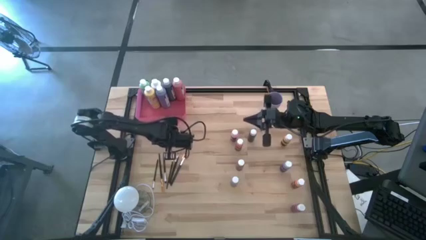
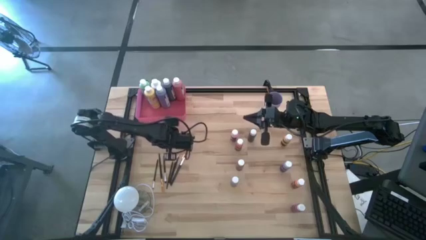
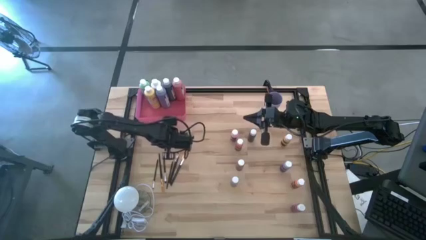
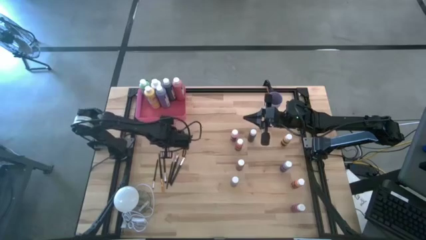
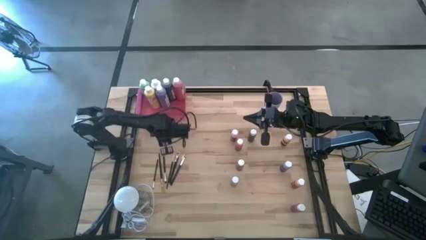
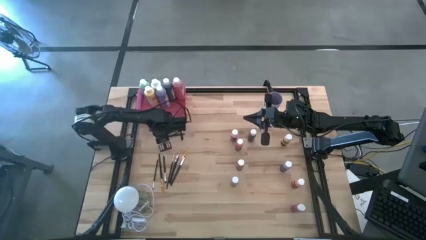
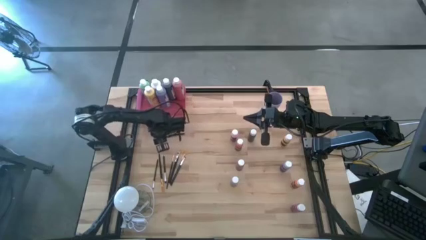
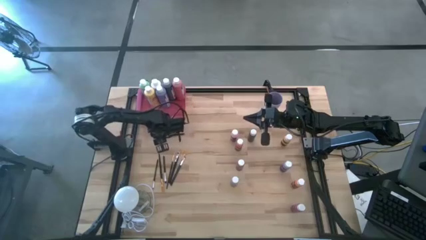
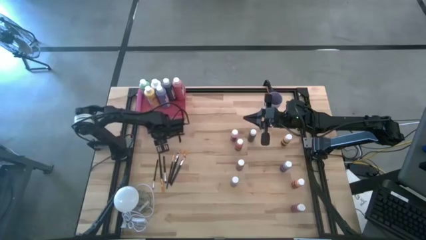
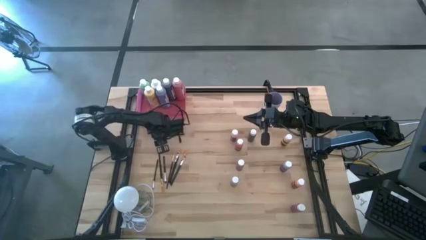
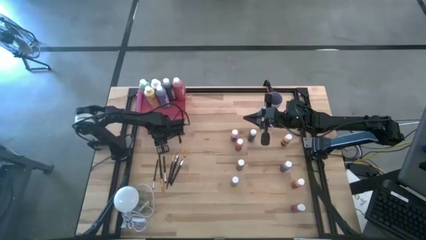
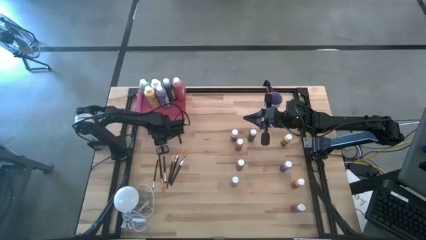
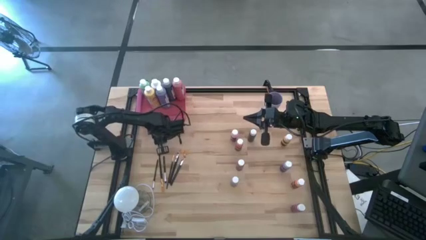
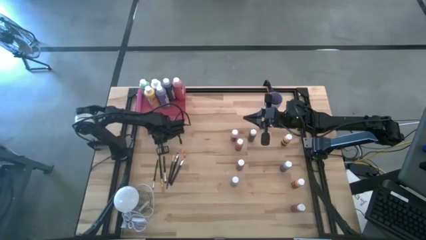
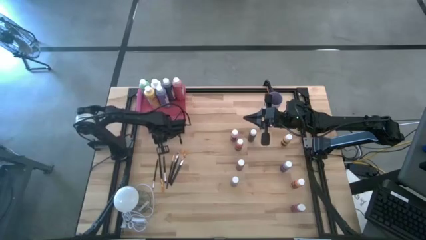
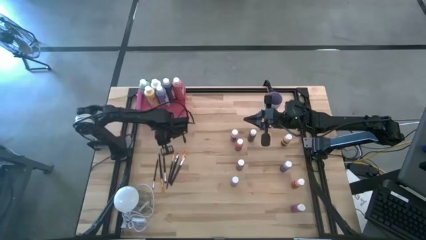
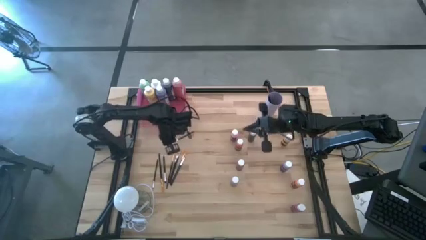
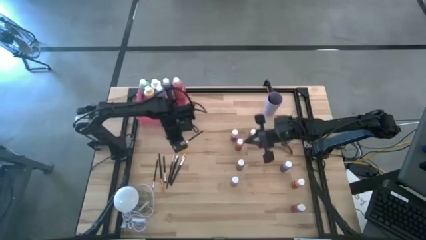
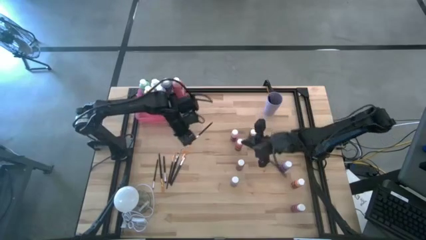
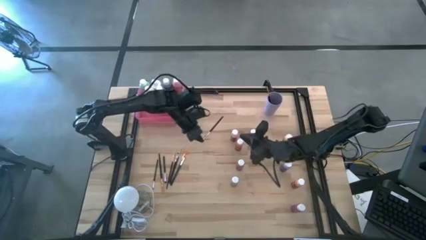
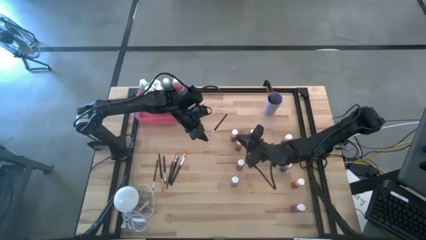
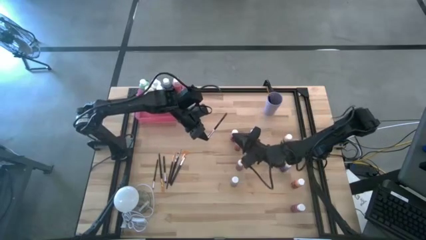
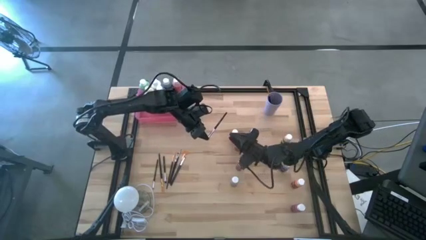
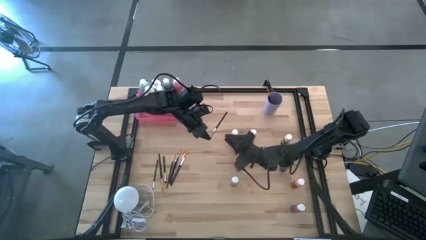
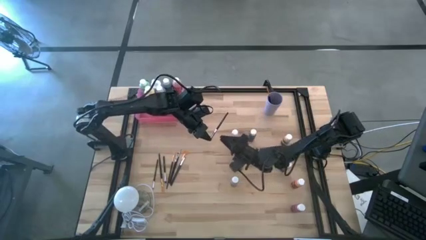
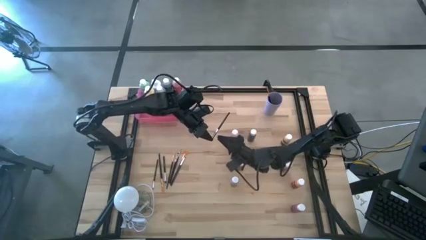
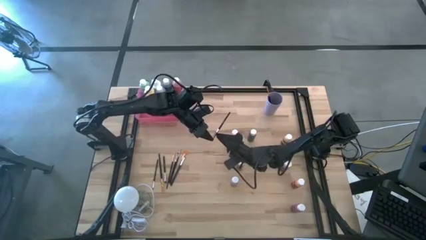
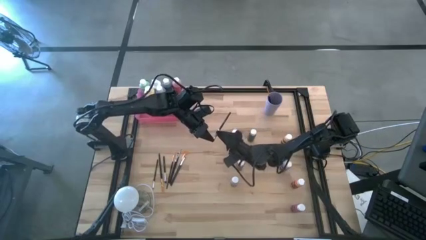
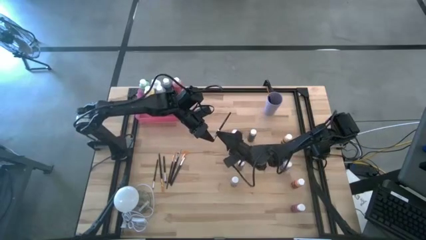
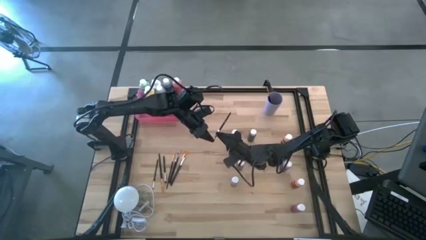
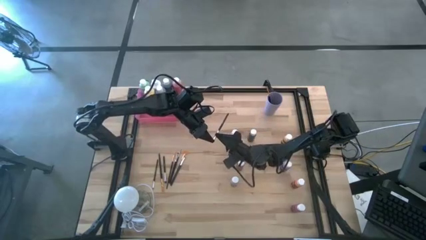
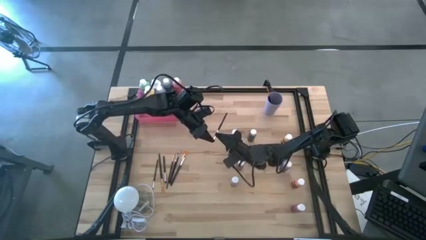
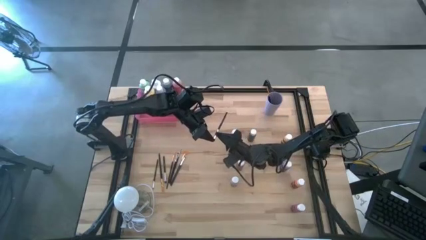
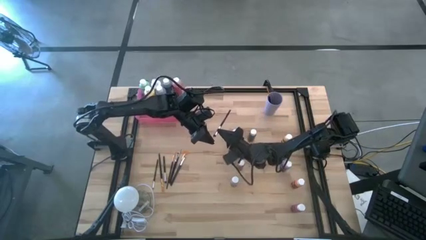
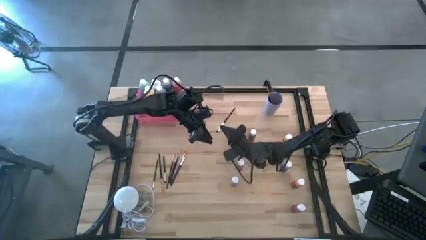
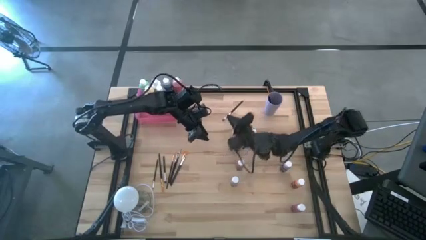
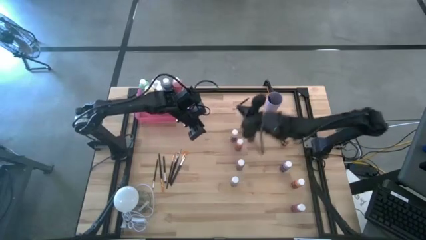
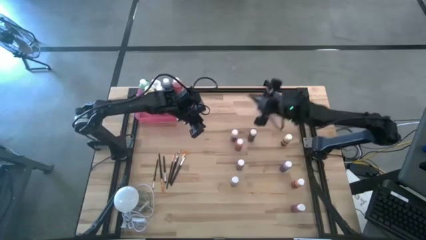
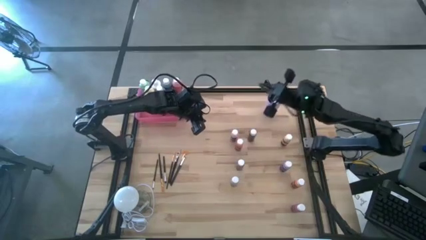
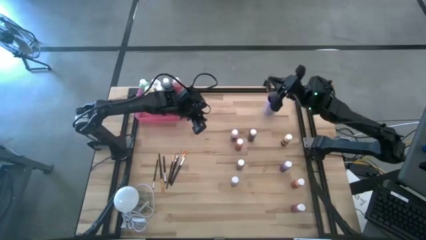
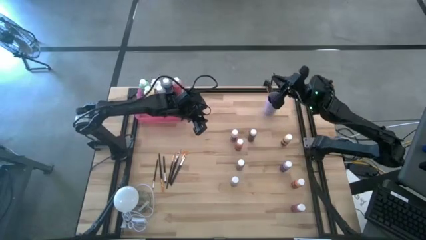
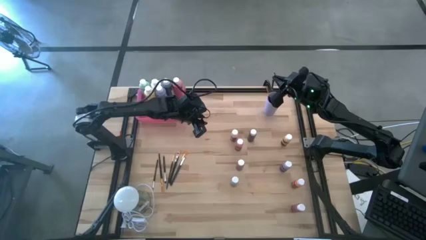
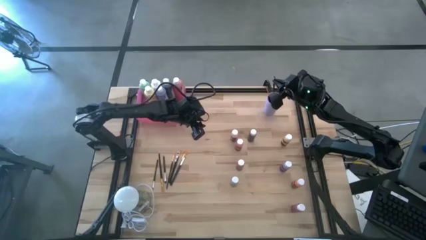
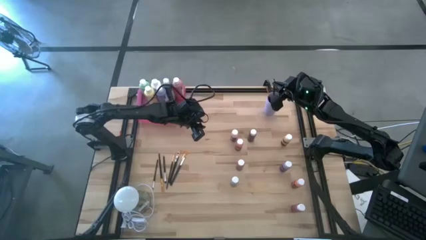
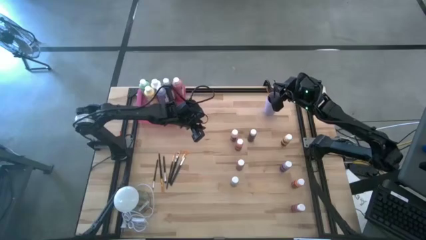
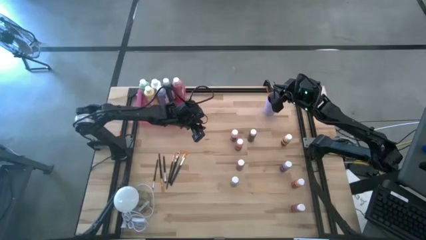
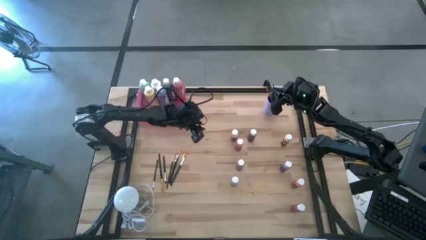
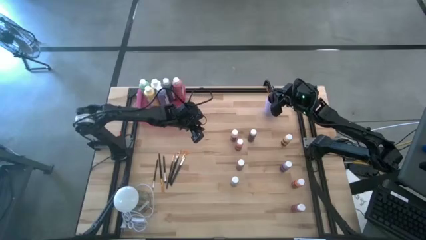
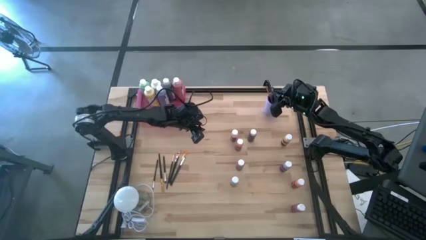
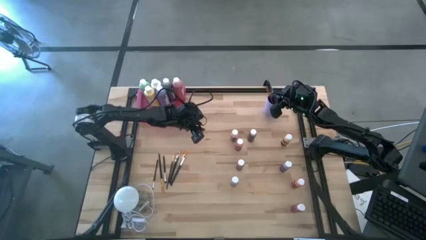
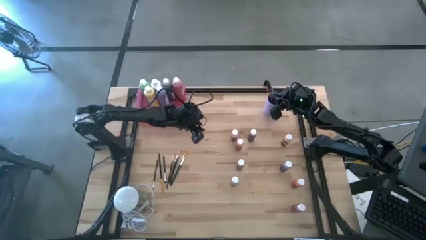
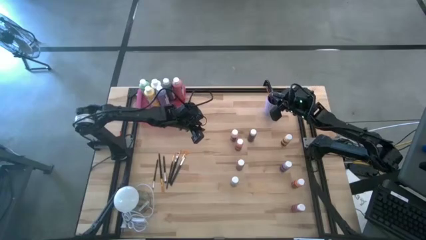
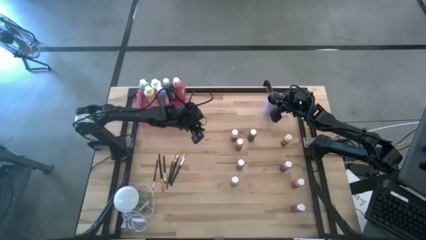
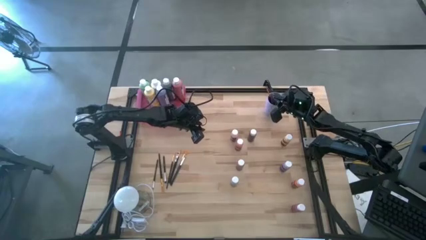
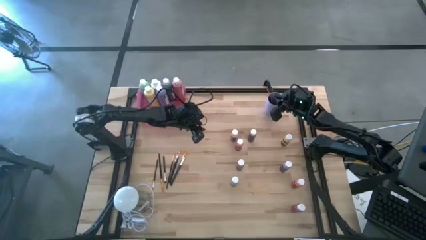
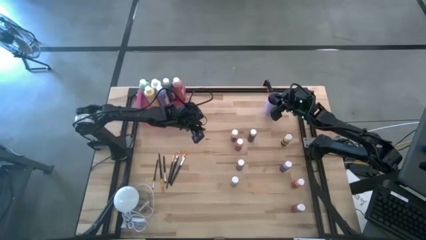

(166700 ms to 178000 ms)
Task: Pick & Place Paint Supplies
Put the silver paint brush into the purple cup

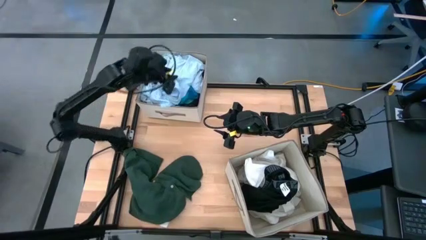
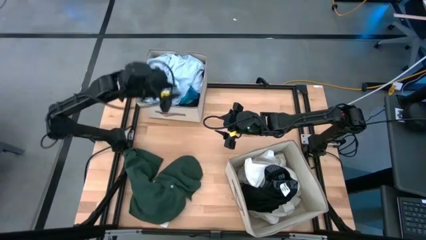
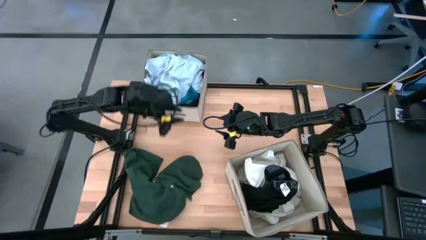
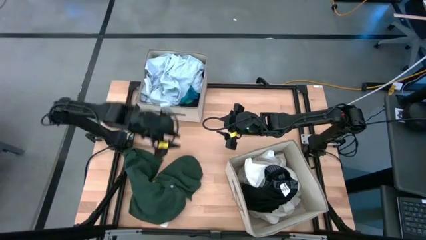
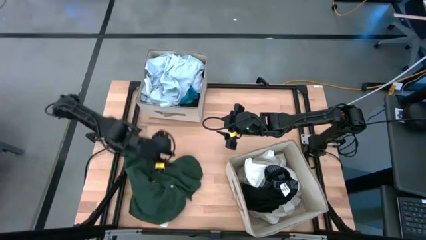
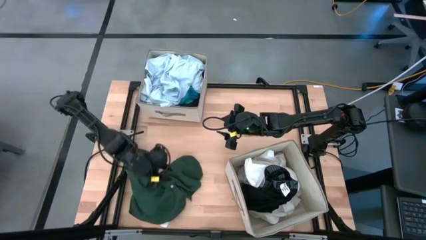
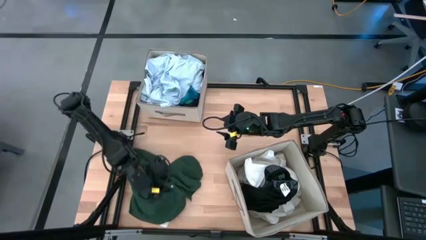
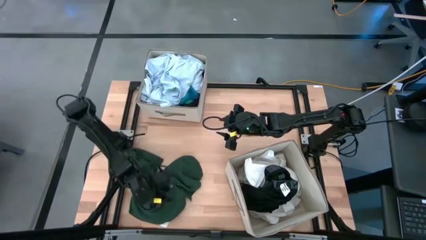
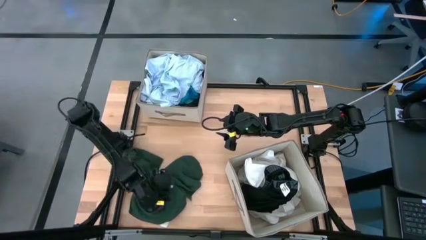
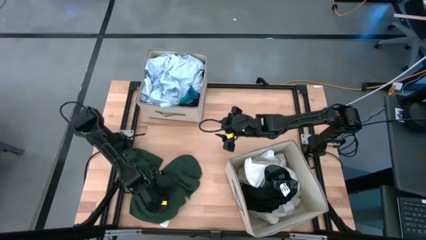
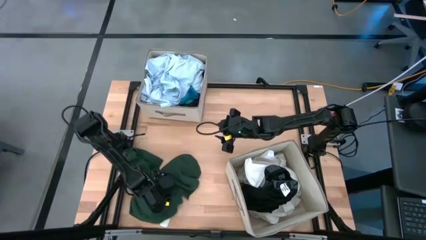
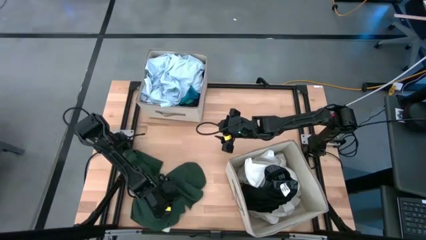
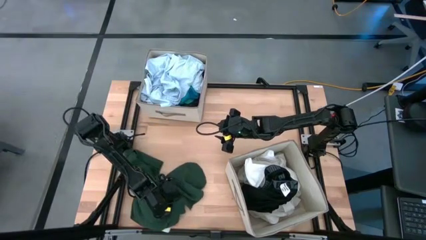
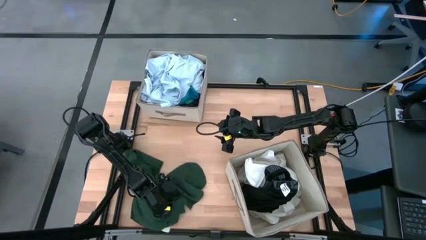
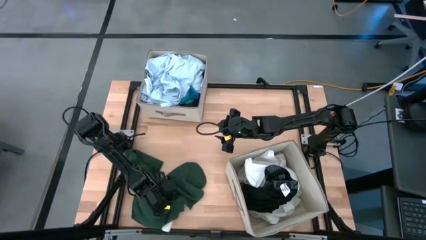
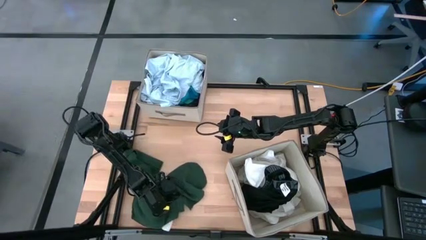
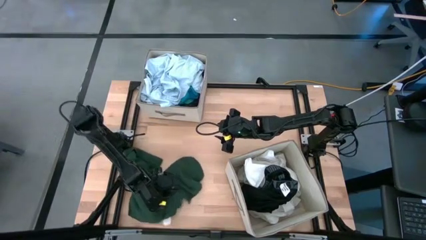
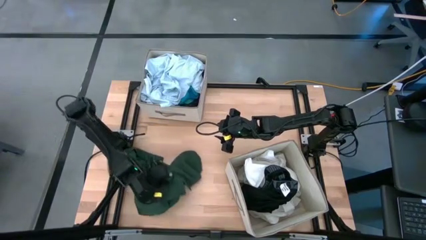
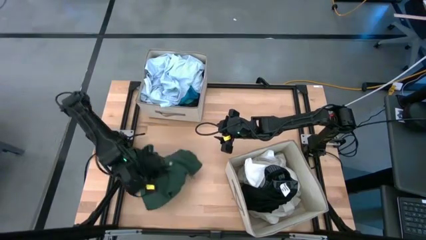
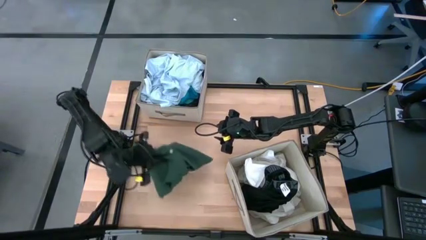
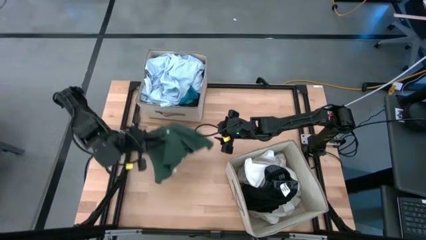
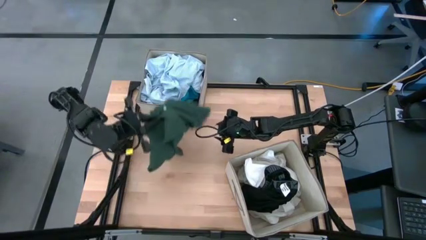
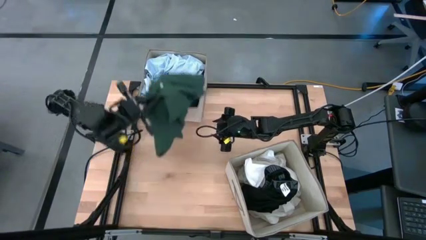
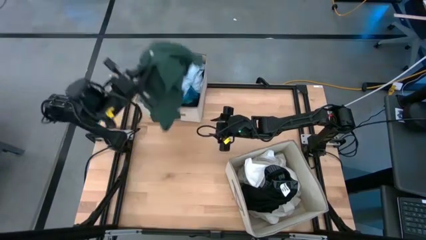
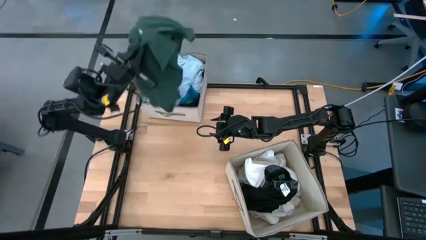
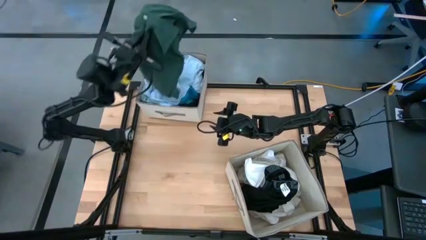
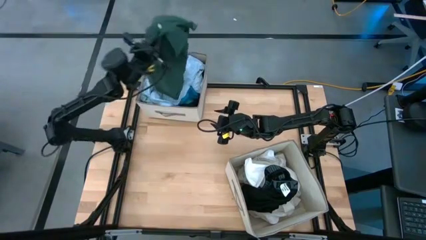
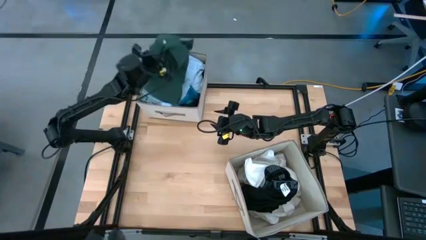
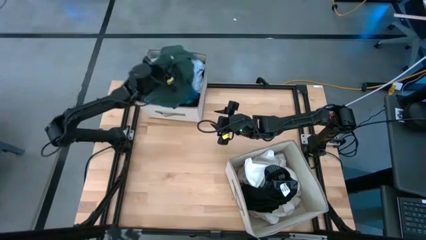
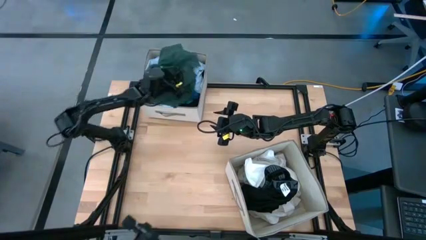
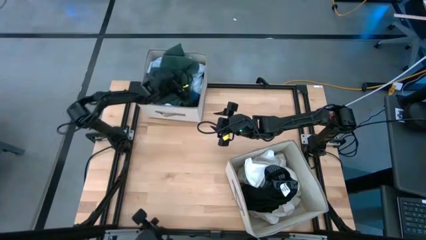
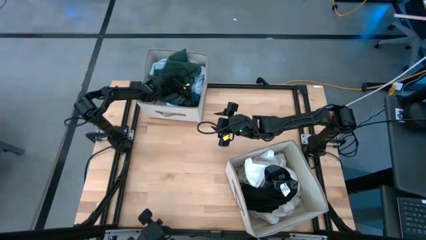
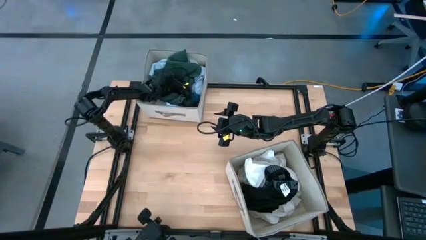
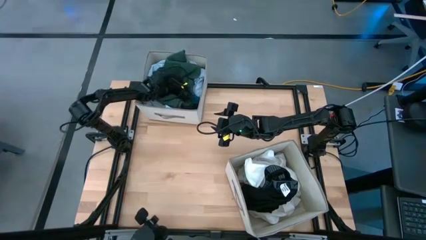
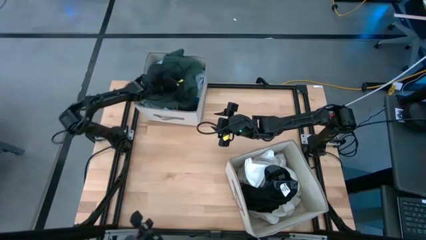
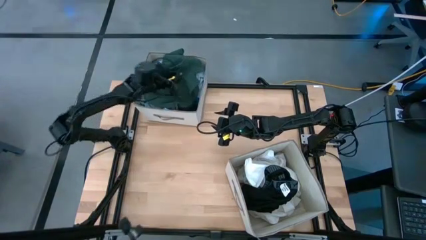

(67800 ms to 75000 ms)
Task: Sort clothes
Put the dark green polo into the top white laundry bin
